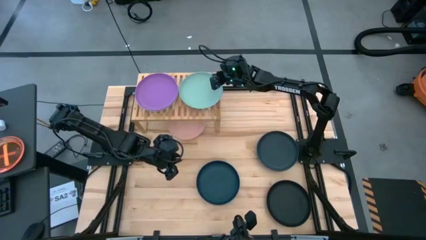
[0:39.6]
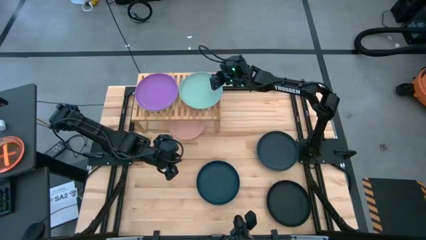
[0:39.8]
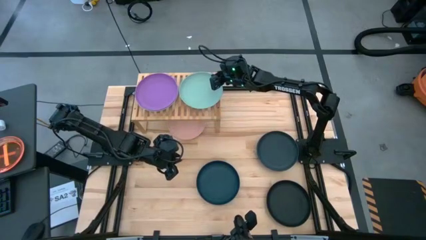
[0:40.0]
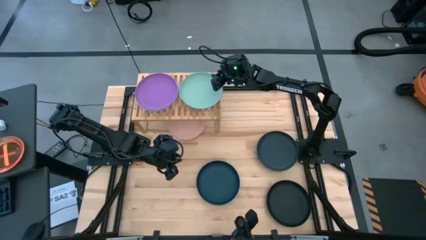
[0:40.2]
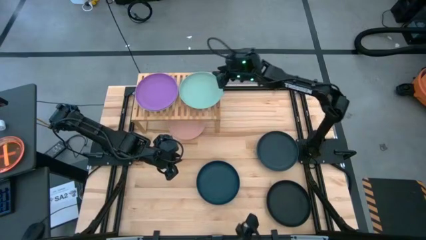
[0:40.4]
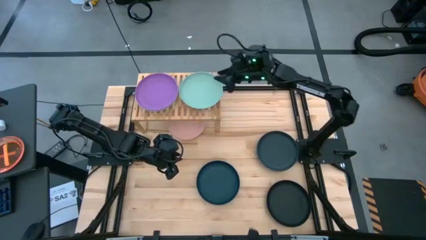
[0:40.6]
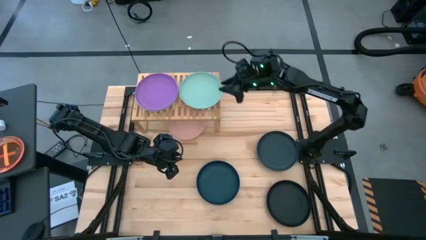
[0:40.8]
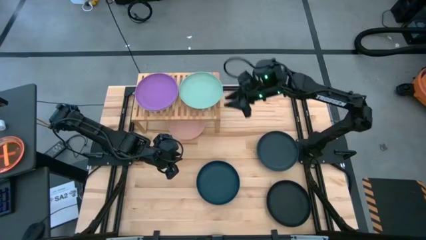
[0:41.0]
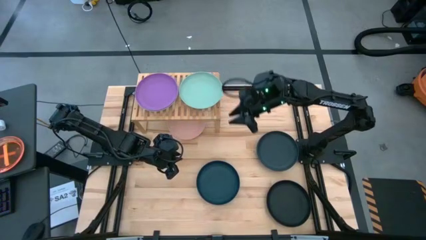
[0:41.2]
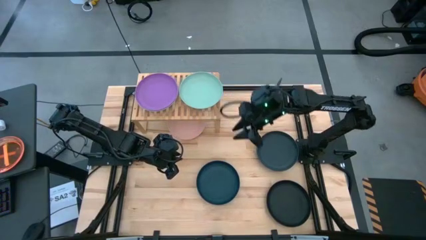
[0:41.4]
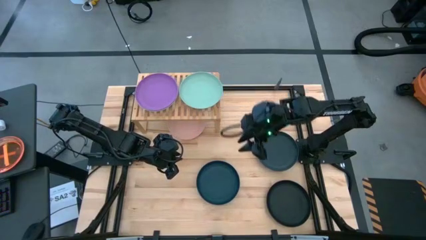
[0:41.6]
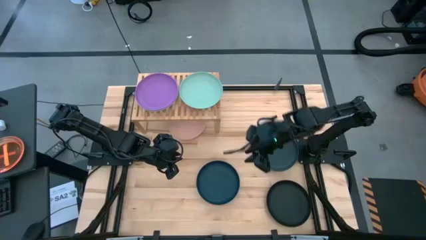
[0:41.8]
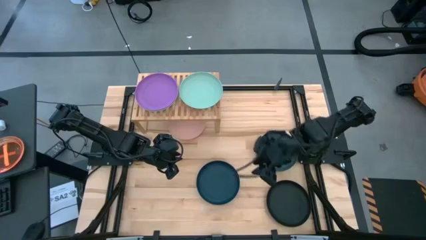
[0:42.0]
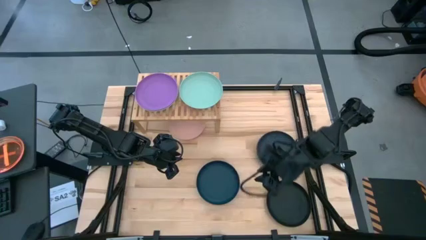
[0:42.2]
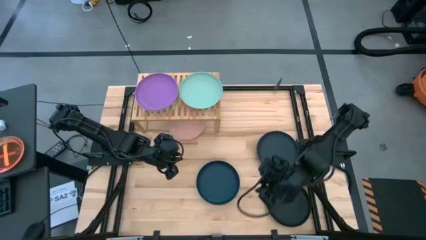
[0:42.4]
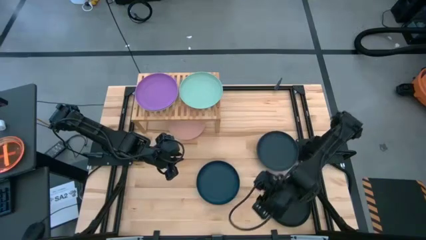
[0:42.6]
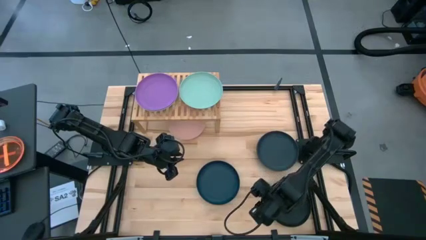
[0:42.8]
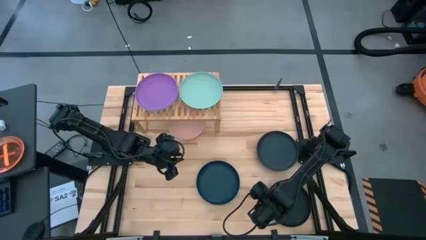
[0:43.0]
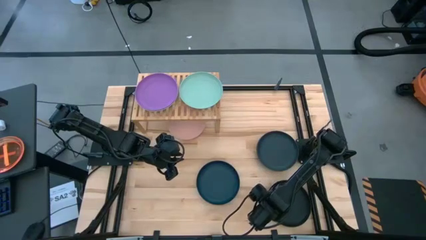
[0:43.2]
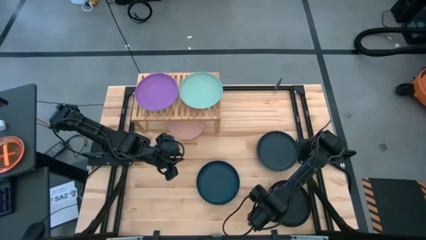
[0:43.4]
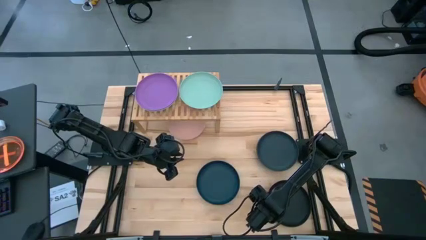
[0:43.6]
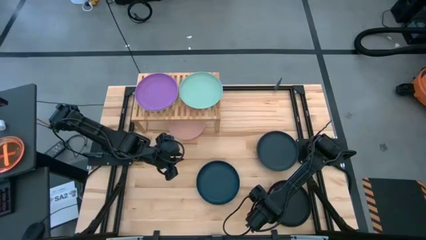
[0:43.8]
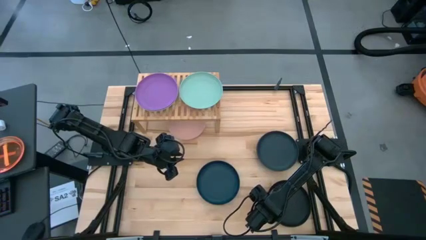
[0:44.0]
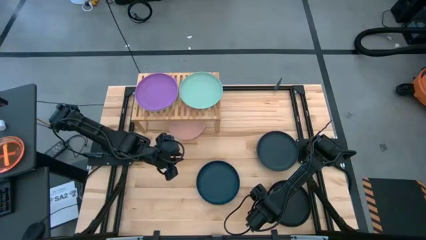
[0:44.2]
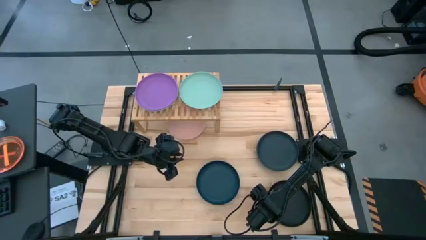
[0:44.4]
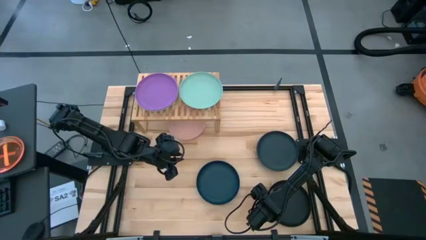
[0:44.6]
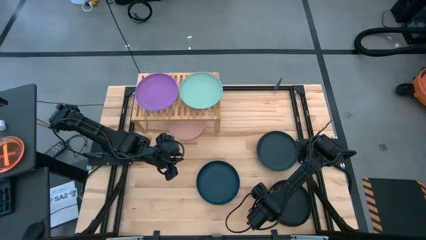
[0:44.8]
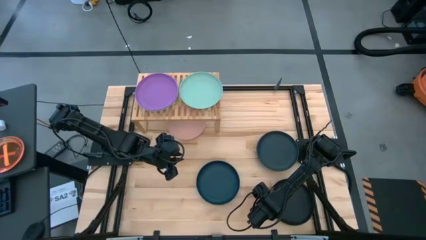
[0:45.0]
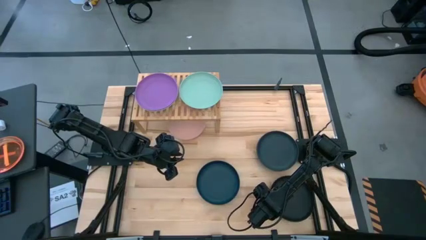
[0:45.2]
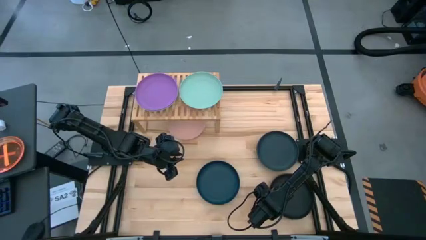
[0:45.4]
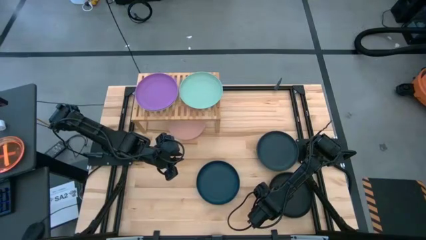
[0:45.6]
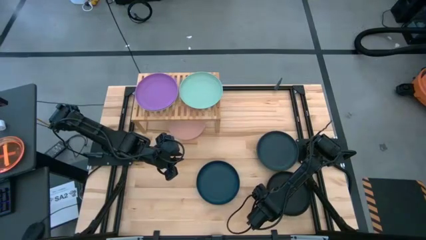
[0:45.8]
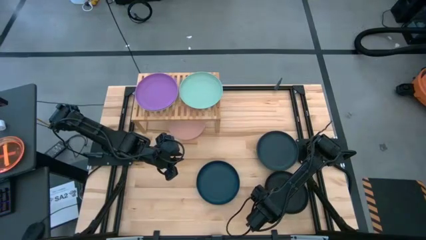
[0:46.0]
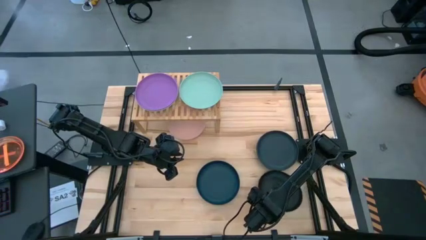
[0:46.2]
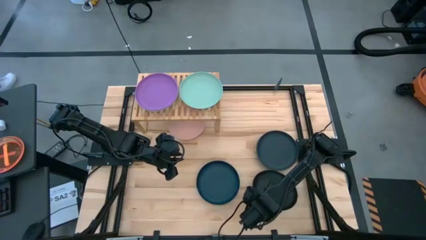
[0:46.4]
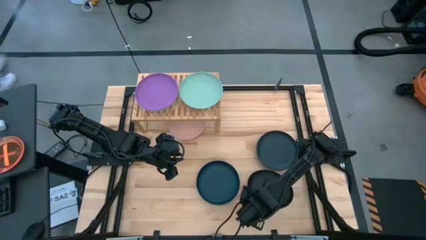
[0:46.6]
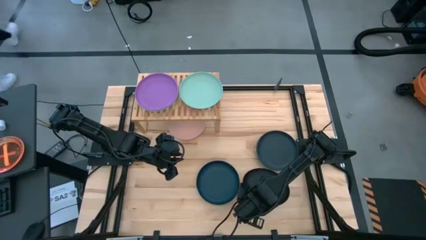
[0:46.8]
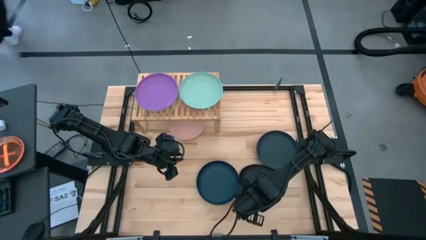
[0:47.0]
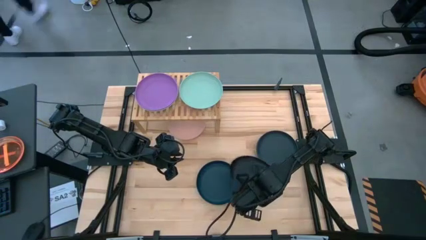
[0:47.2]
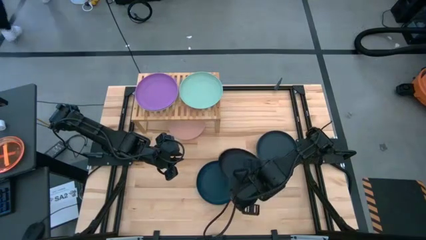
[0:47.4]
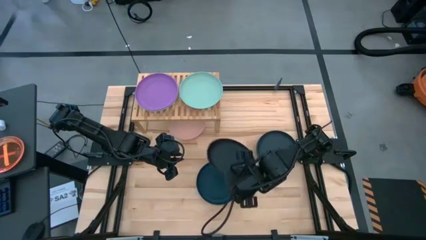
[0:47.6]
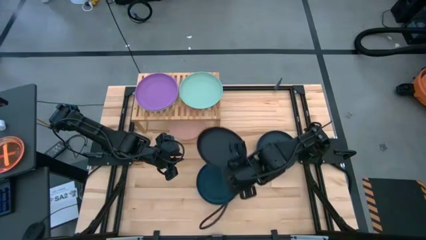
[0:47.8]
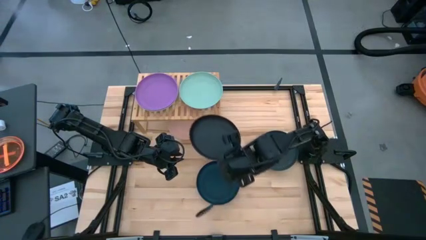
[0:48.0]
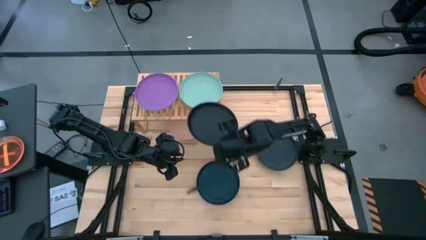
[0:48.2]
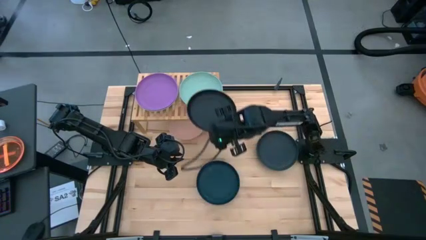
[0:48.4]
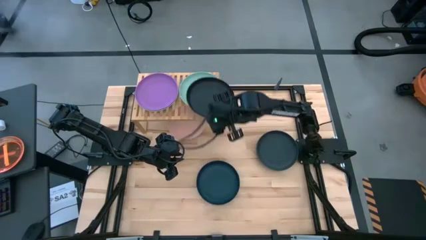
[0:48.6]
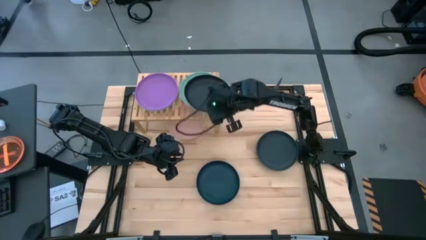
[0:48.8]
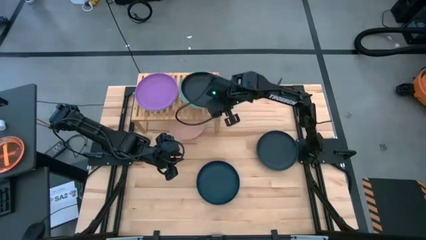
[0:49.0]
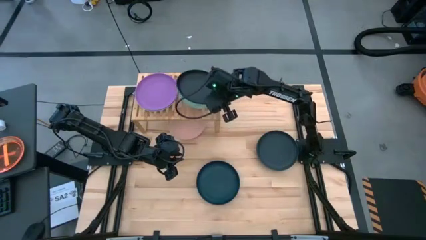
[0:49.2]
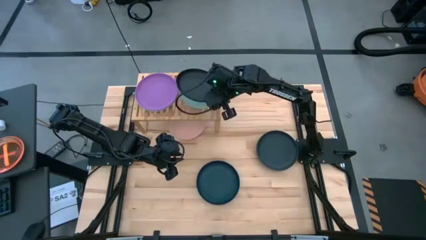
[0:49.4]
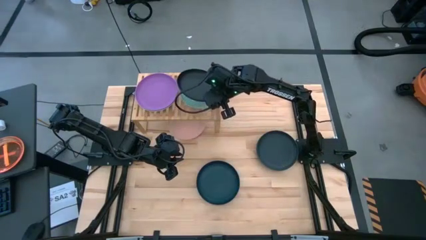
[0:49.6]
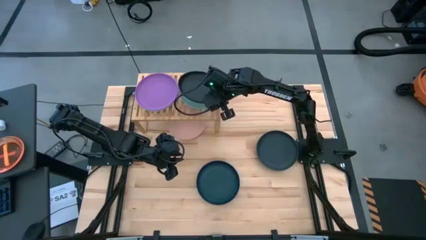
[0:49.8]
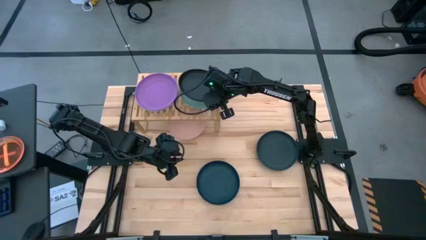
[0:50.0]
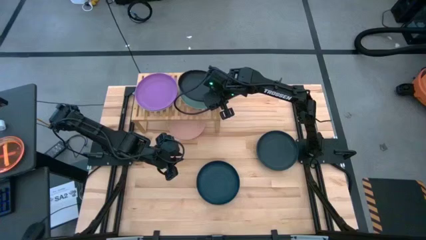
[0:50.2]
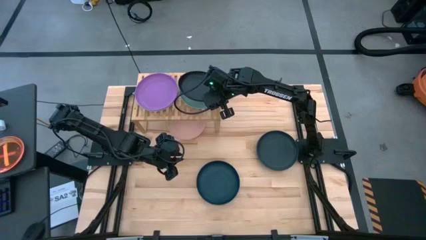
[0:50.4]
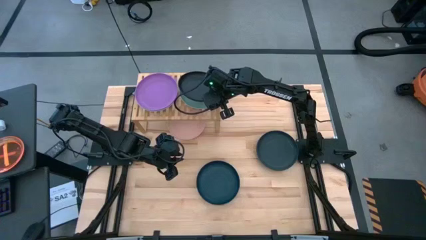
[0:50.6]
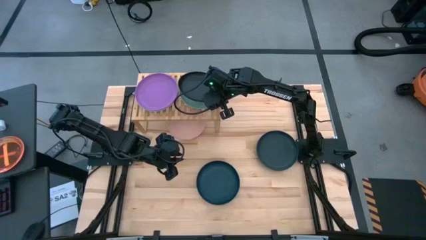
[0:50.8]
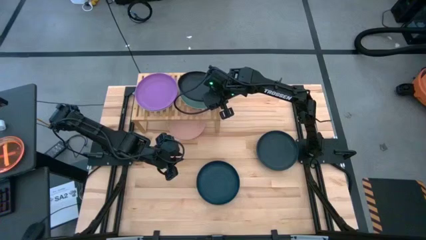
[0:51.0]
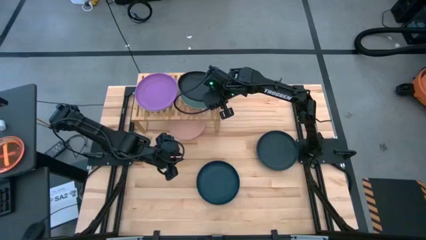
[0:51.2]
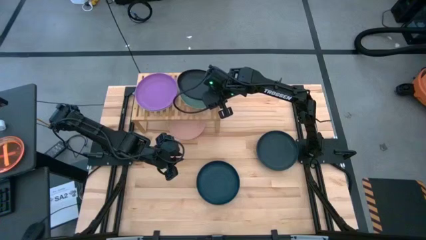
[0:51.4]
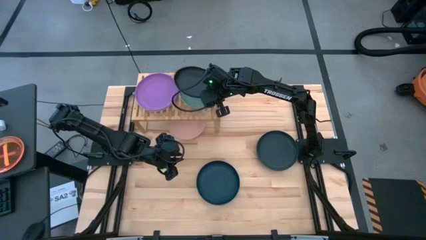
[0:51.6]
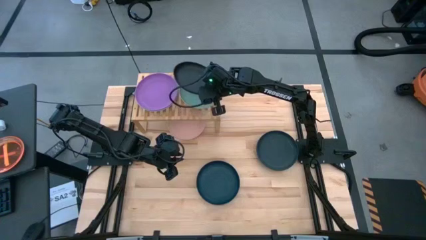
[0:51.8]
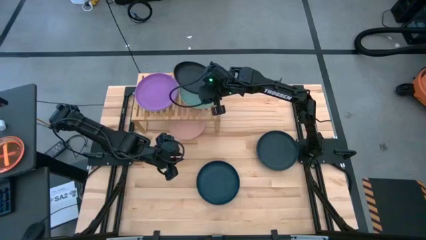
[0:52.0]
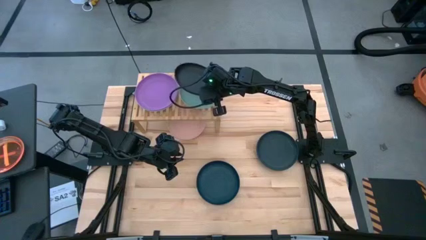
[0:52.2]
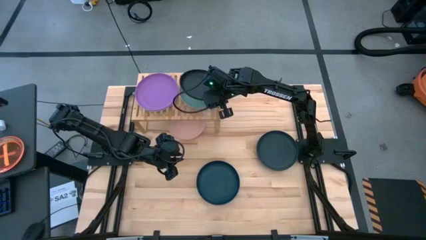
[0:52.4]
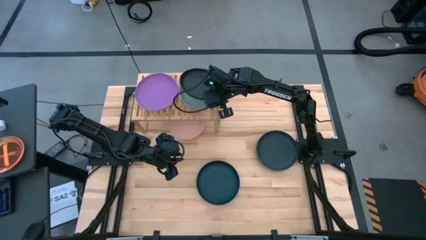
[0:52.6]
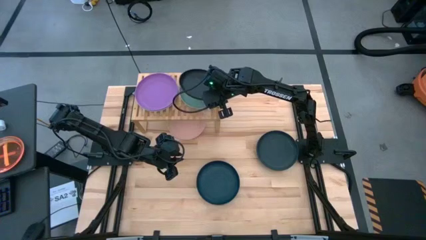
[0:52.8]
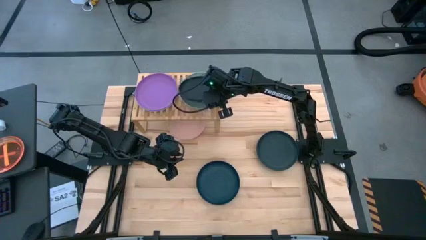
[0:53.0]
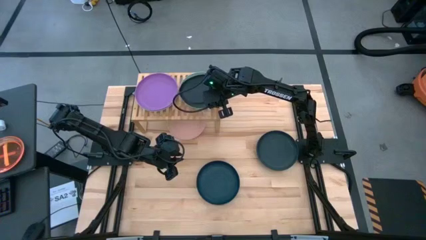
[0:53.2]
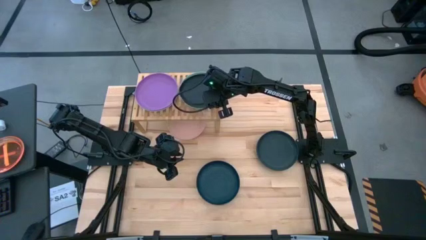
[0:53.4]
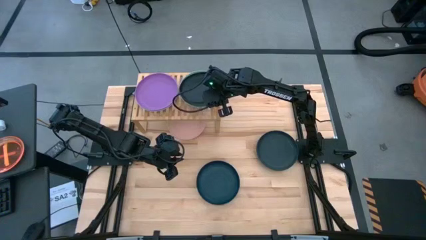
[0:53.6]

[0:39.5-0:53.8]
Task: Place and stack plates onto a shelf
Stack the black plate on the top of the light green plate on the shelf

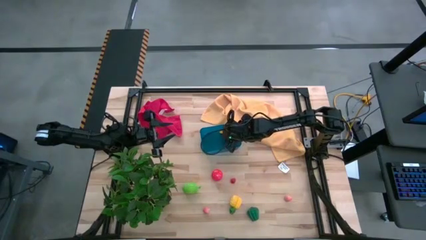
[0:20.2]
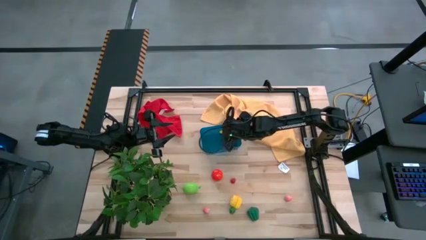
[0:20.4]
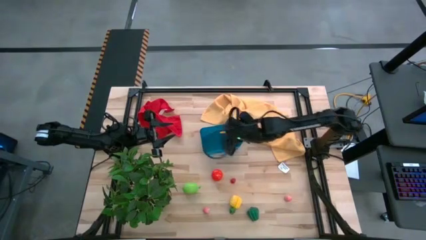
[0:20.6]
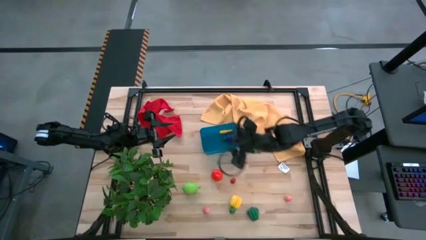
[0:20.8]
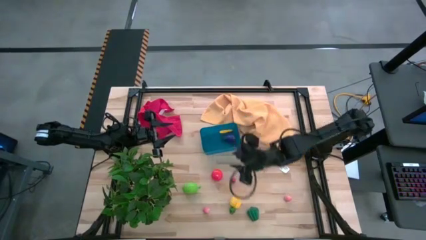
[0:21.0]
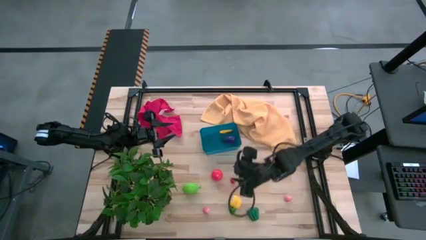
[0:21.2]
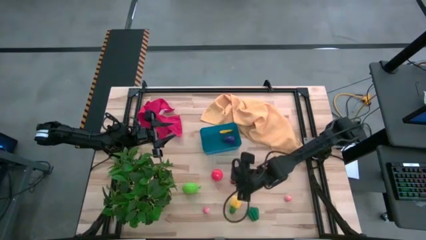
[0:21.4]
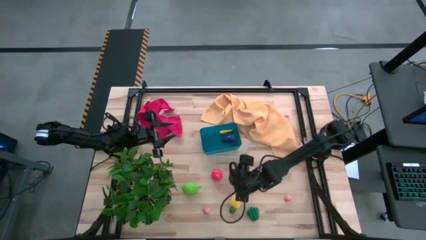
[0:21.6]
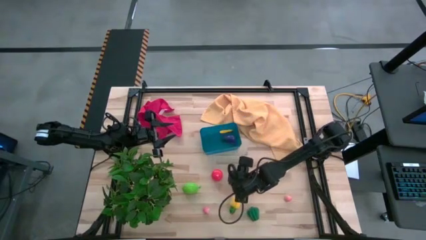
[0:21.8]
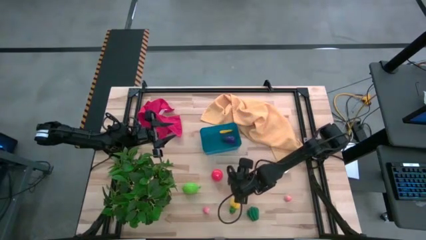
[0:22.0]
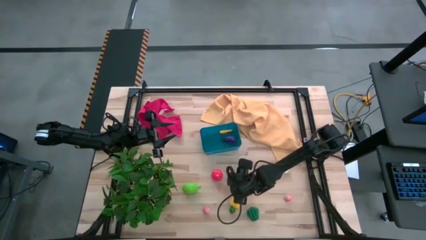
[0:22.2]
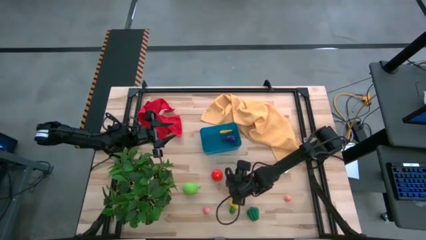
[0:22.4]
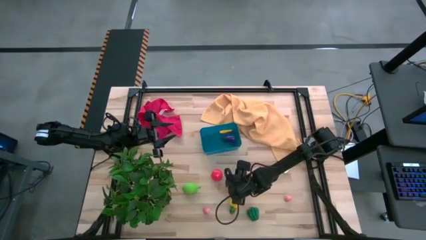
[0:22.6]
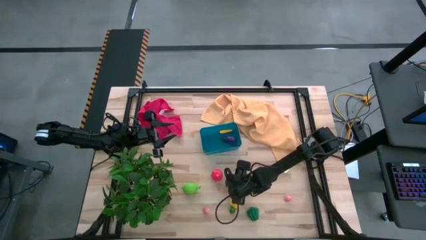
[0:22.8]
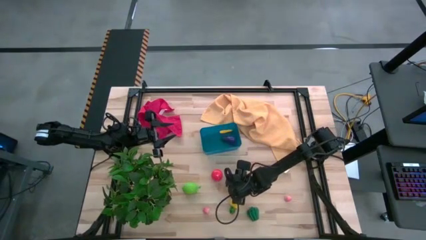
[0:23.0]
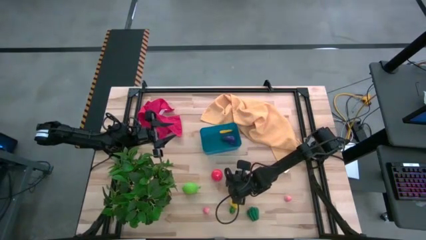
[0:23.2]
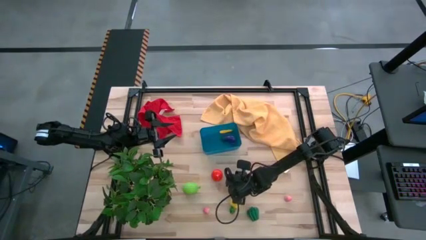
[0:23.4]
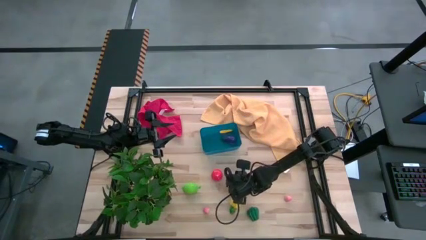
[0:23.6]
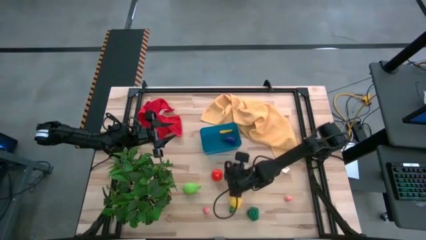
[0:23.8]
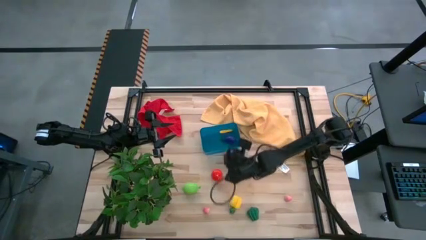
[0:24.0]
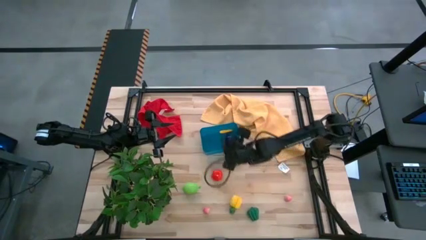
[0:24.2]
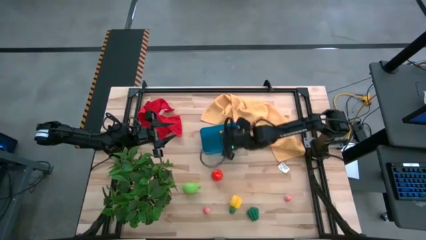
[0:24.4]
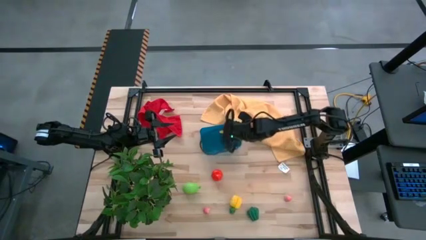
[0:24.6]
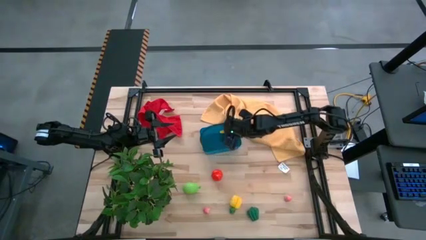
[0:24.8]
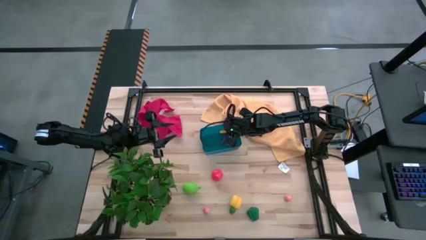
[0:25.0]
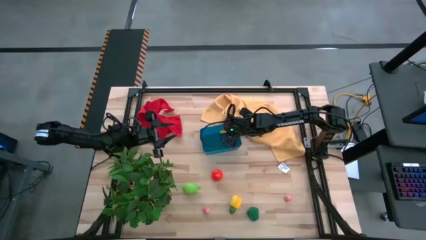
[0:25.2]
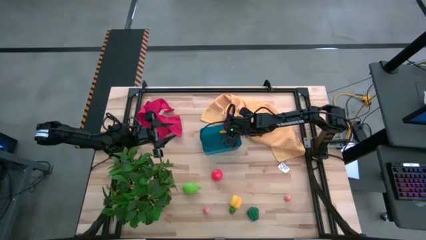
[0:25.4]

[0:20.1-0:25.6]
Task: Pick and placing Produce into tupperware
Put the red raspberry into the blue bin
